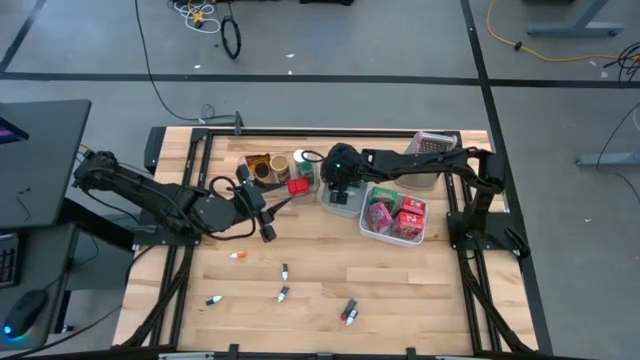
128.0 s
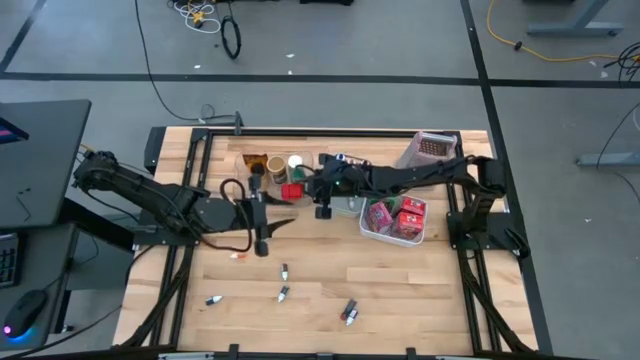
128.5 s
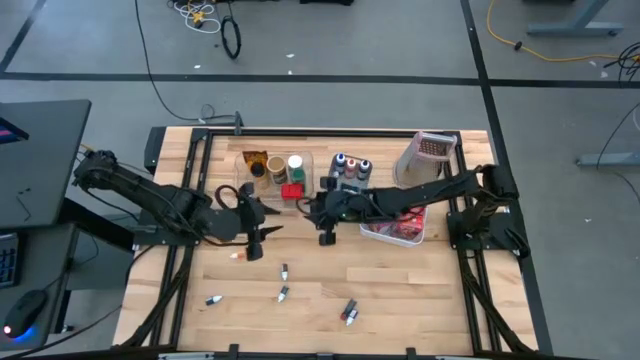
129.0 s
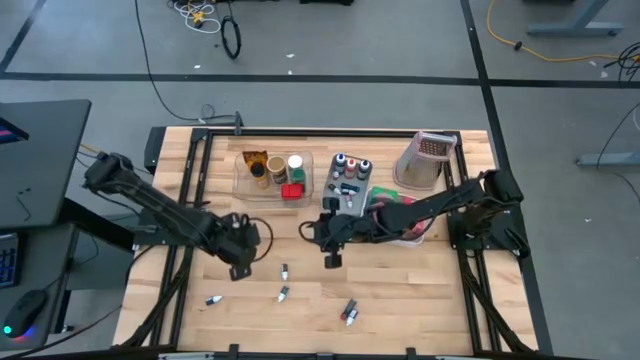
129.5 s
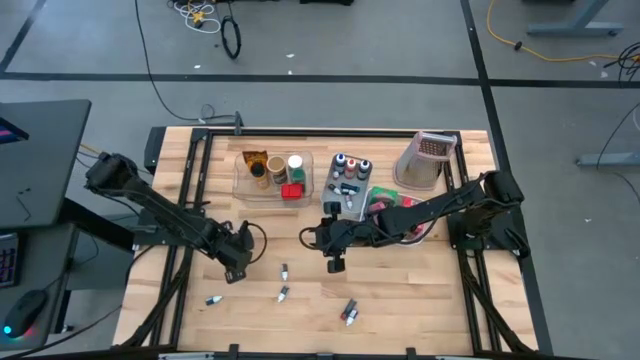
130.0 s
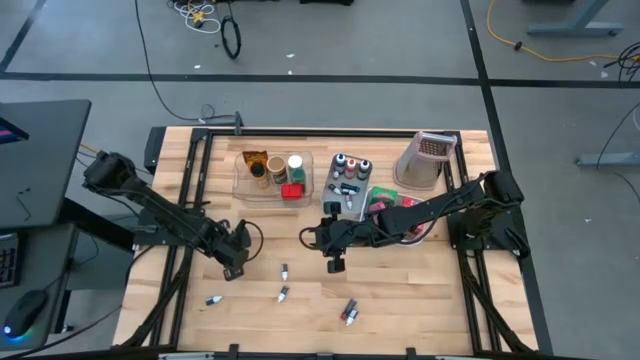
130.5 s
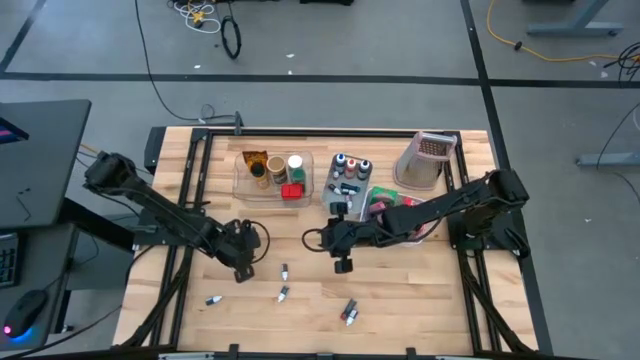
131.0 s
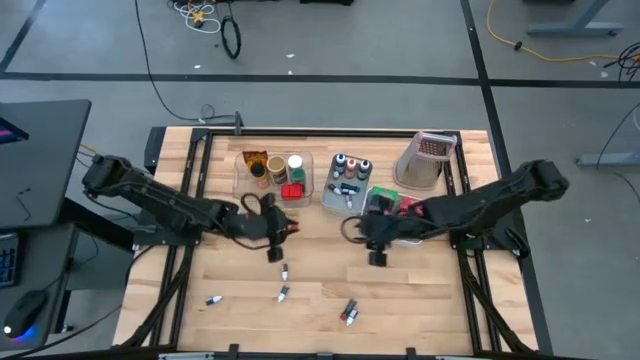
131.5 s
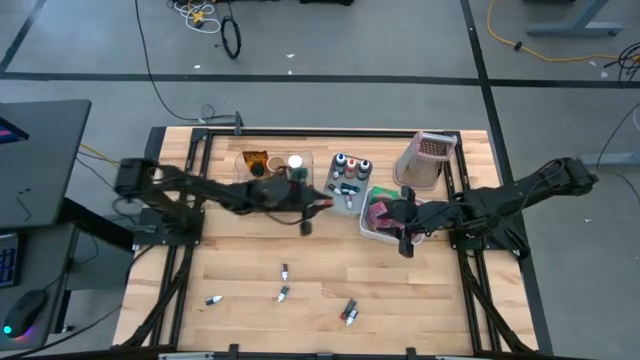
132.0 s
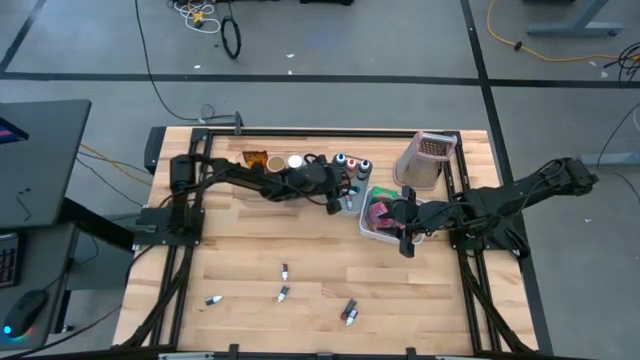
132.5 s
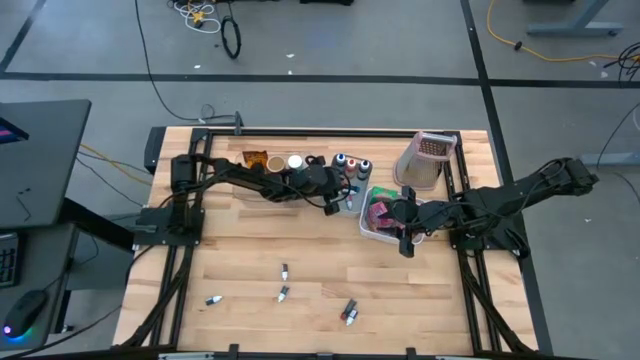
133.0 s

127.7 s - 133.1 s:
Task: Pick & Place Kitchen Items
Put the small yellow food coloring into the gray bin

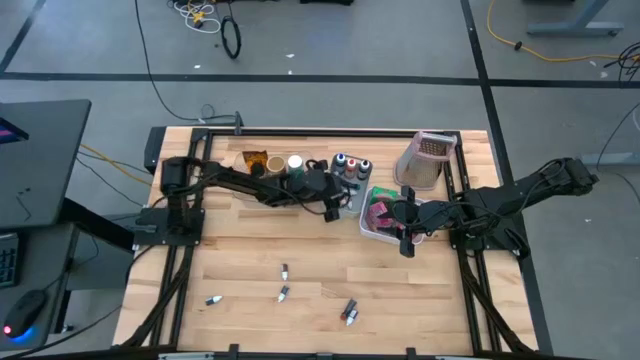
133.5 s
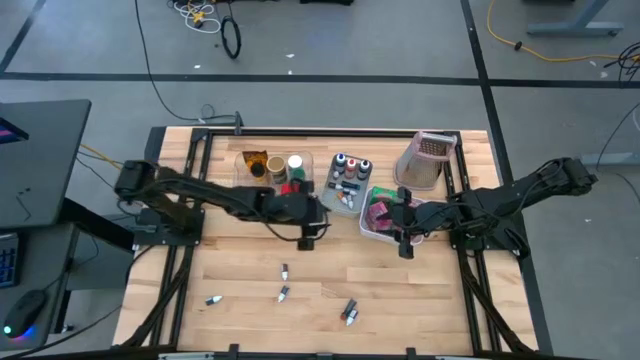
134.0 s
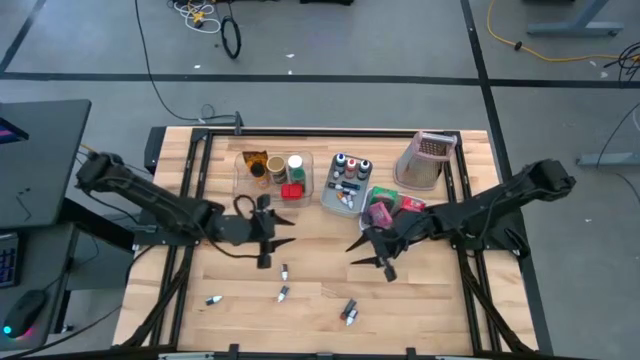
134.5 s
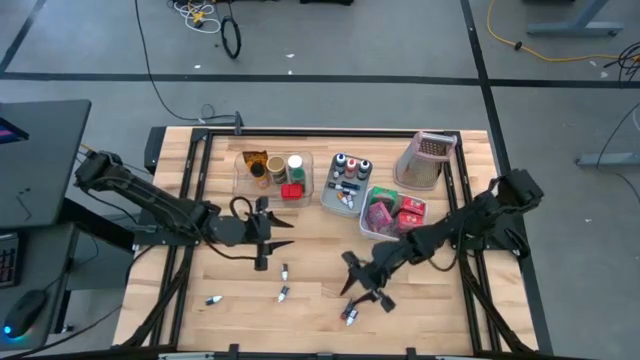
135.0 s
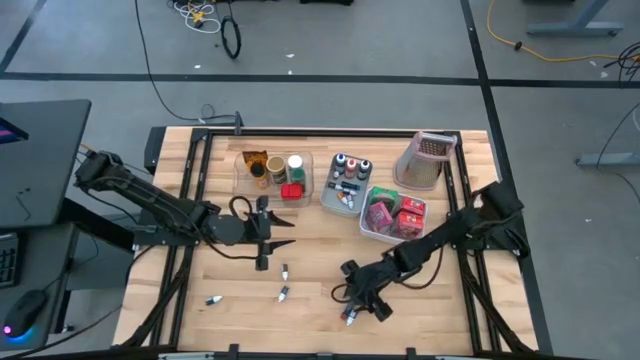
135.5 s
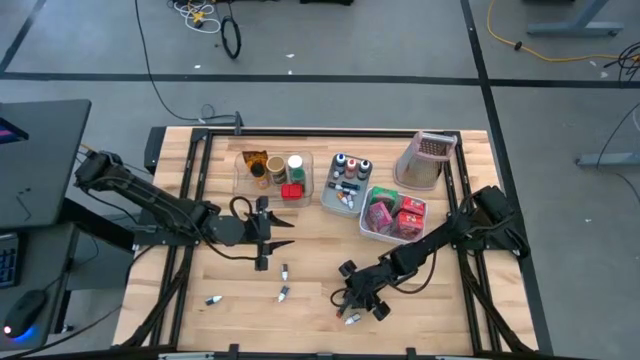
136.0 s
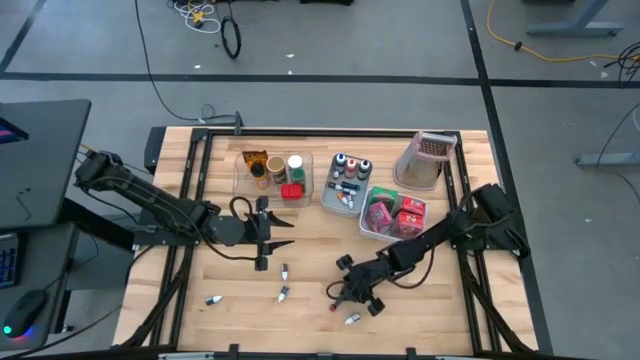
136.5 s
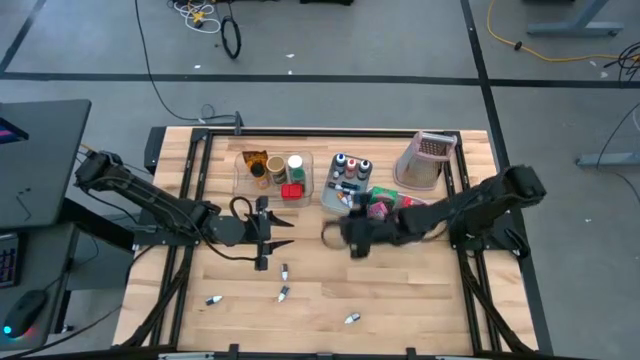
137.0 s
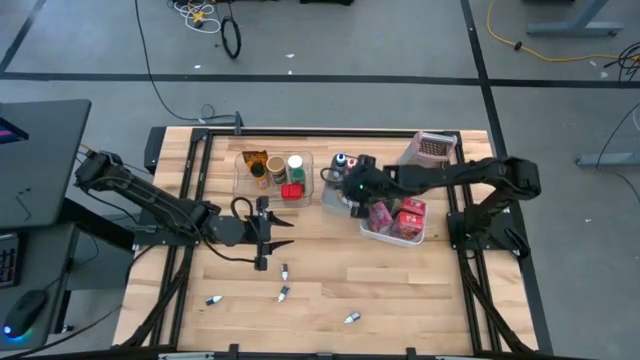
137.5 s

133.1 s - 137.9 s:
Put the small orange transparent food coloring into the gray bin

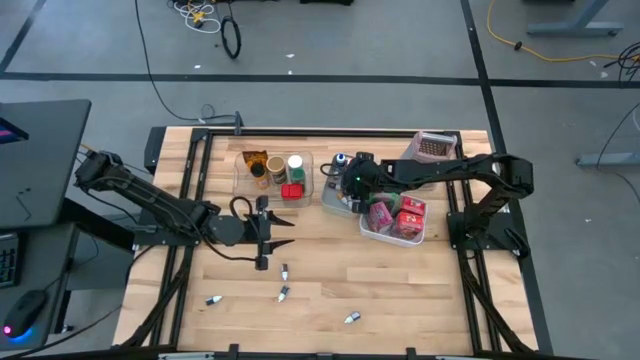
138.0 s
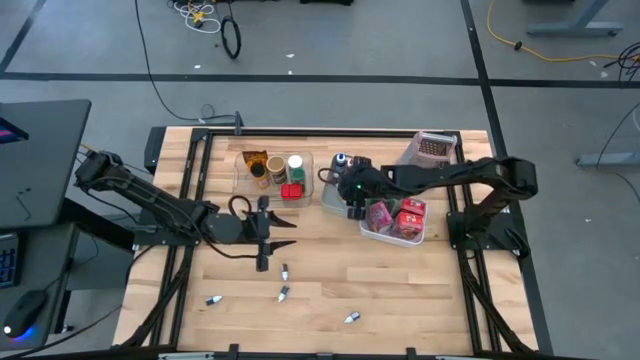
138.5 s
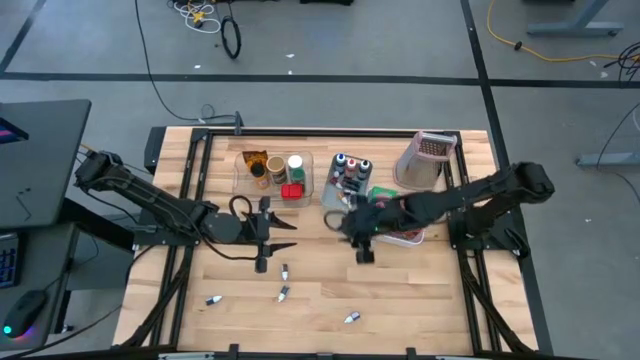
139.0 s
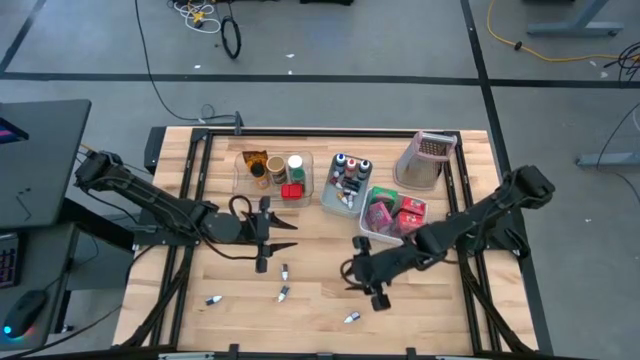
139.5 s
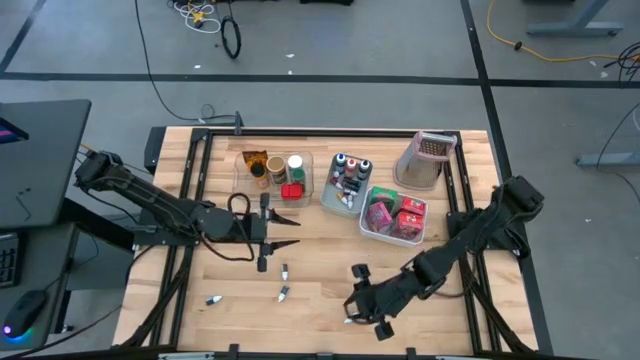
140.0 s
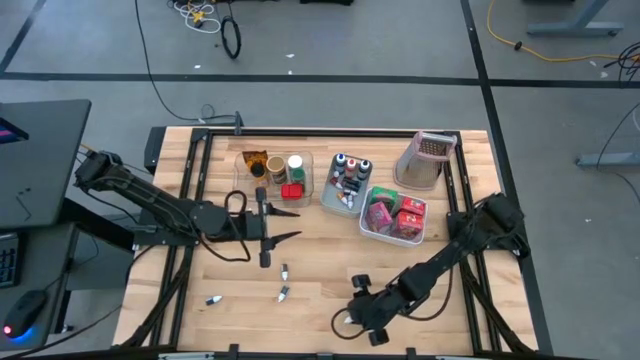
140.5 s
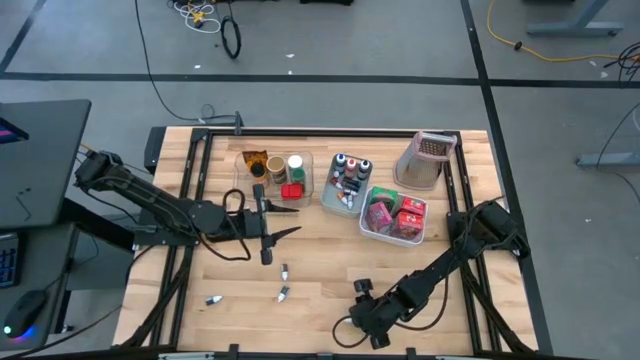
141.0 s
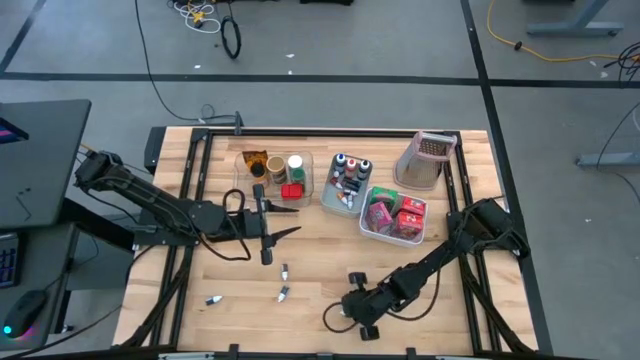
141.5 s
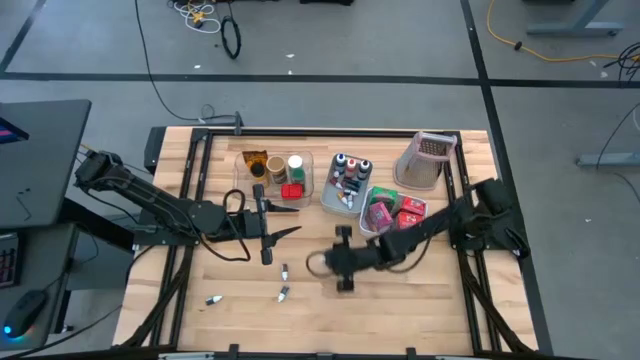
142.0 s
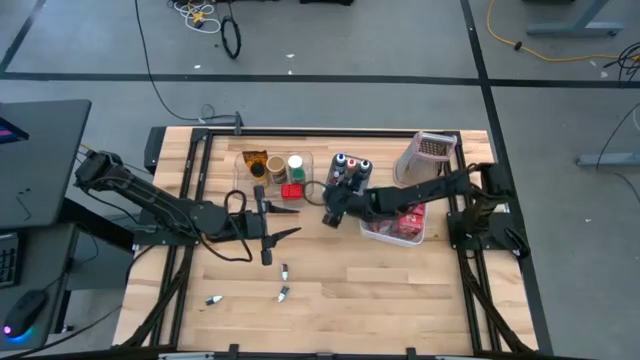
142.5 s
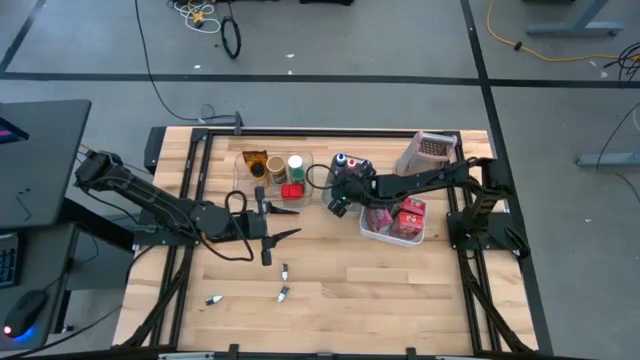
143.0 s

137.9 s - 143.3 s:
Put the small purple food coloring into the dark white bin

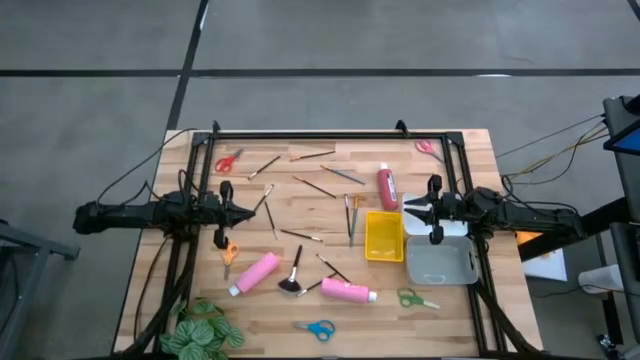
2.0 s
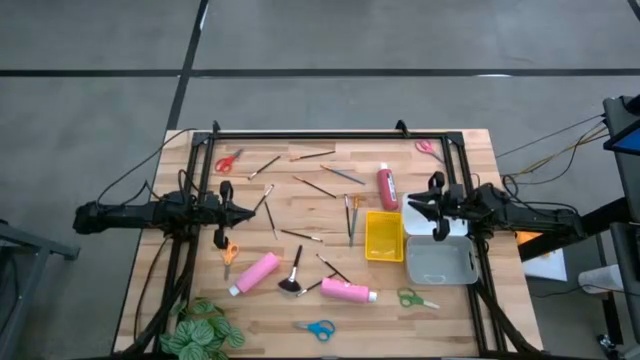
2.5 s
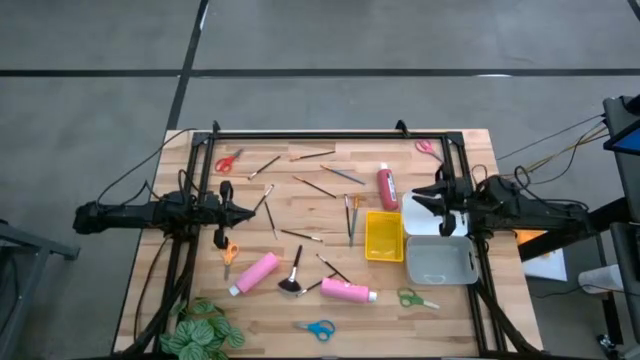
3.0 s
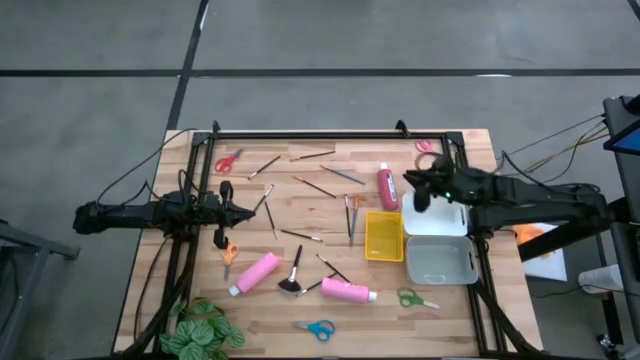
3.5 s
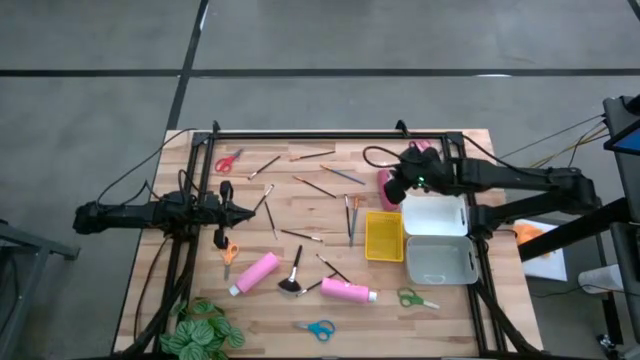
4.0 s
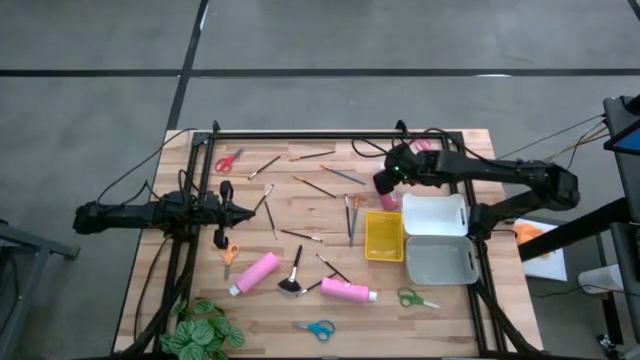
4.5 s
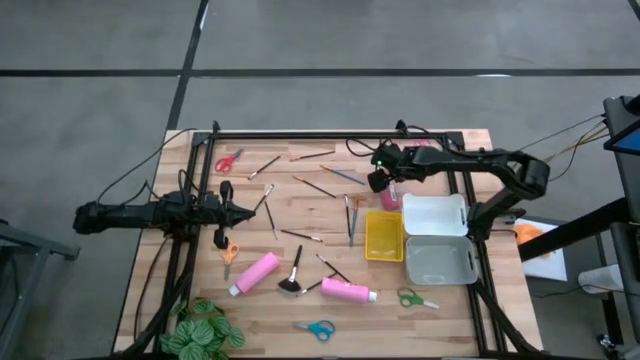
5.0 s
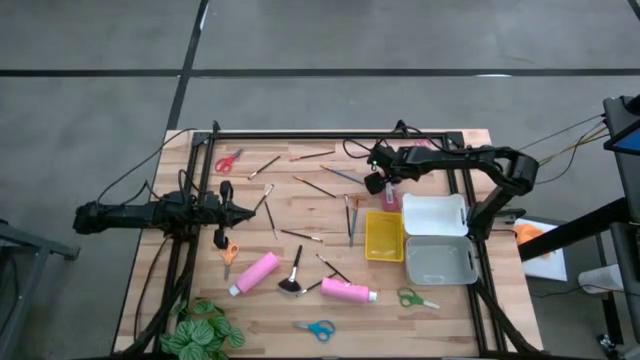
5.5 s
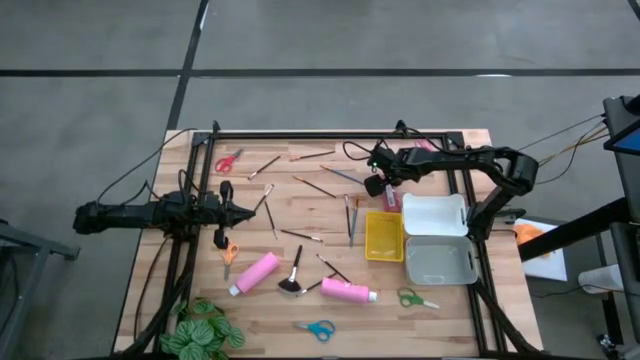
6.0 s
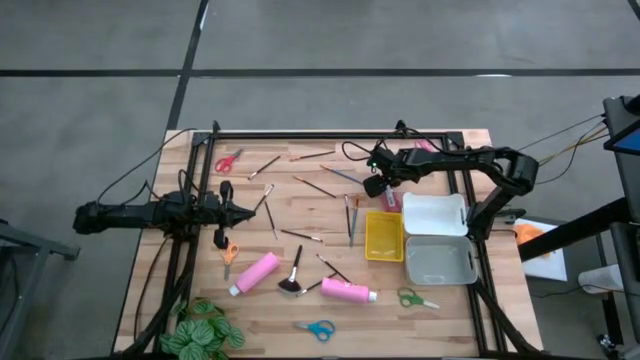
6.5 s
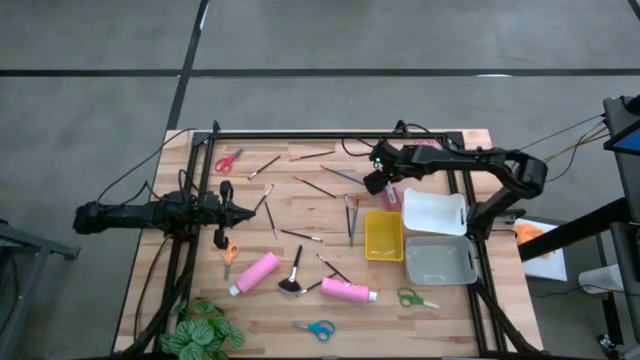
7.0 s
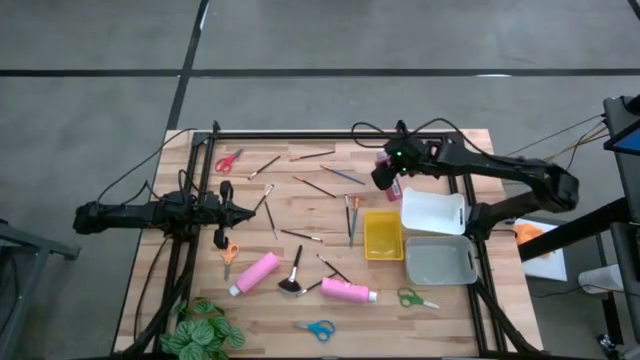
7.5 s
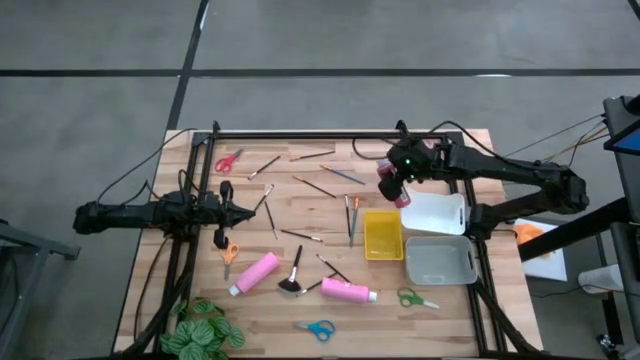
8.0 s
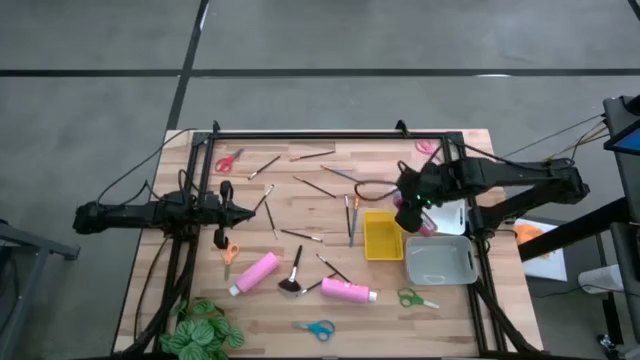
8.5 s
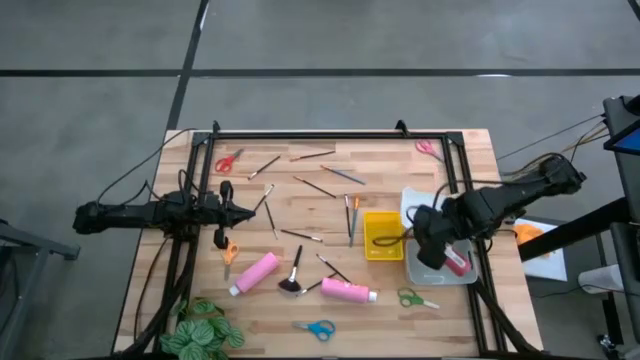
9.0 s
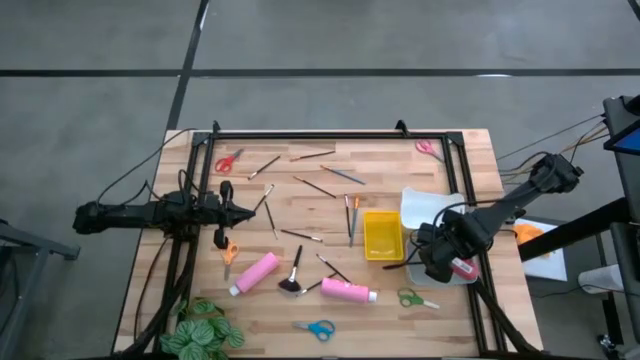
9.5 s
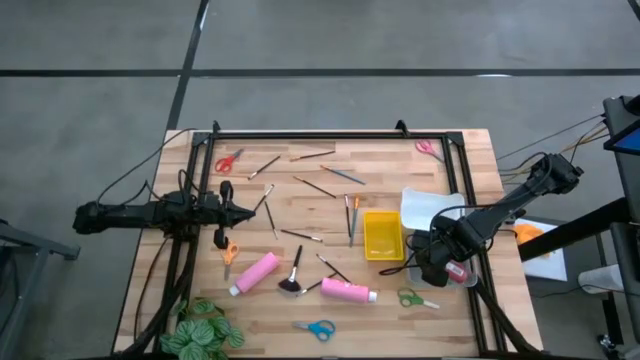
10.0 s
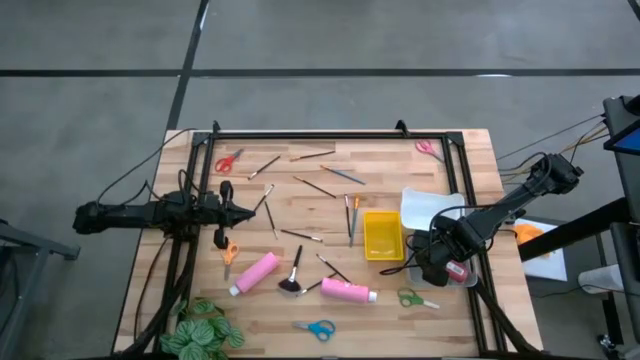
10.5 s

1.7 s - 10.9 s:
Task: Pick & Place Paint Supplies
Put the red paint bottle into the gray bin
